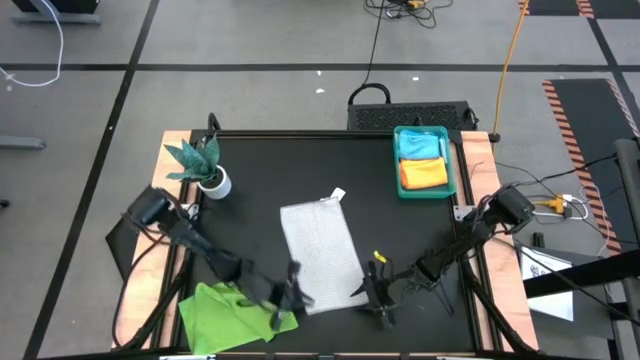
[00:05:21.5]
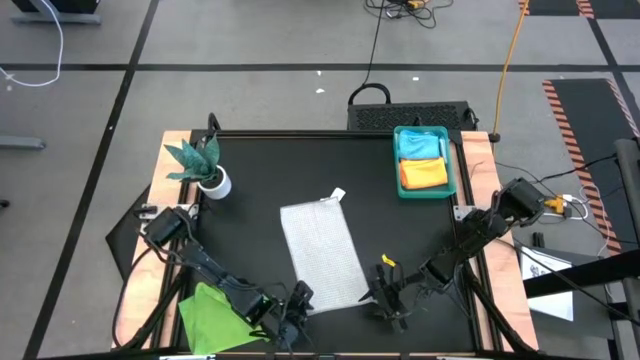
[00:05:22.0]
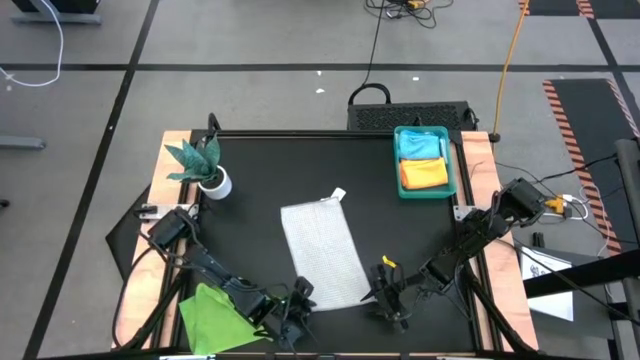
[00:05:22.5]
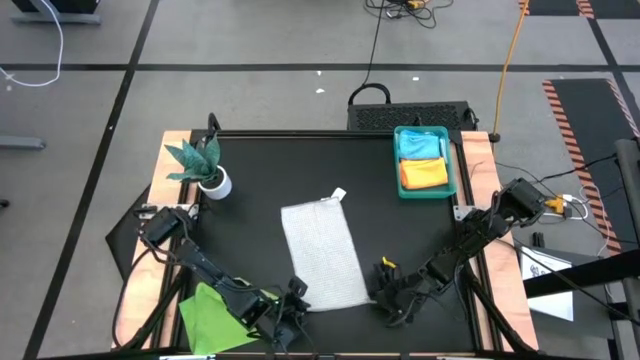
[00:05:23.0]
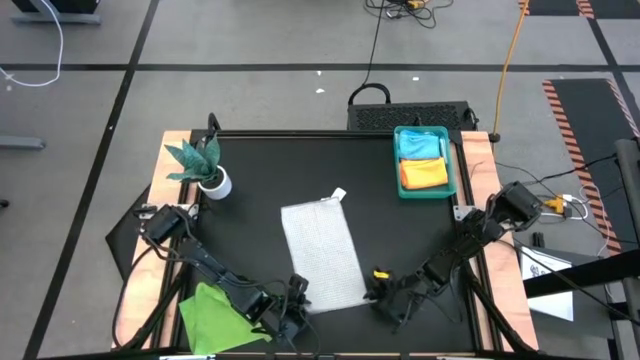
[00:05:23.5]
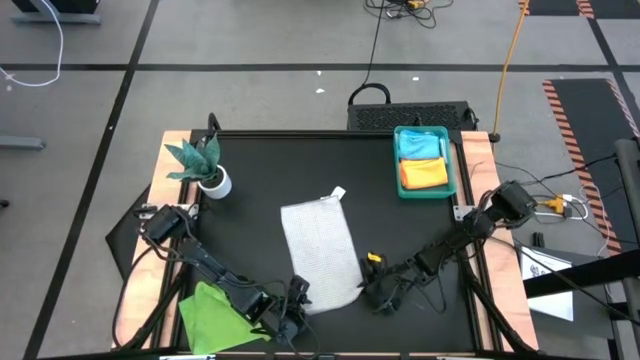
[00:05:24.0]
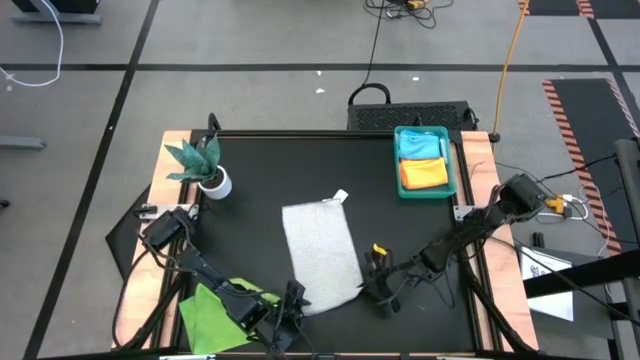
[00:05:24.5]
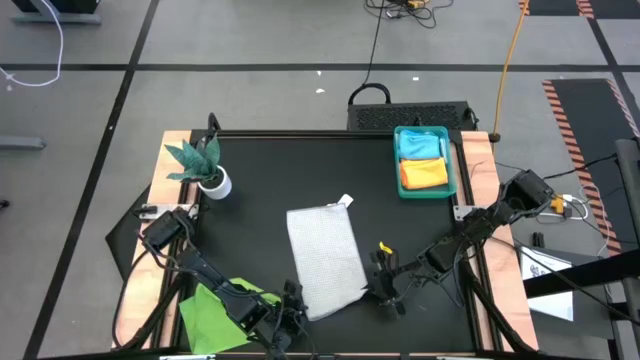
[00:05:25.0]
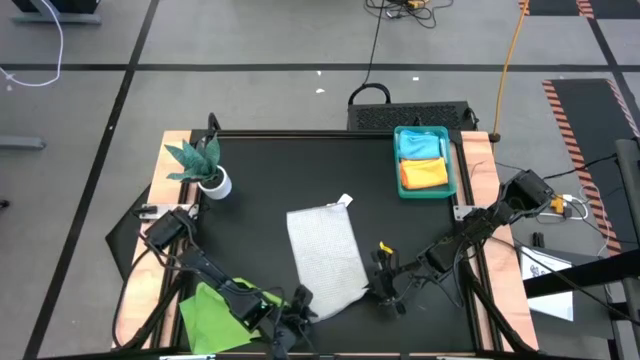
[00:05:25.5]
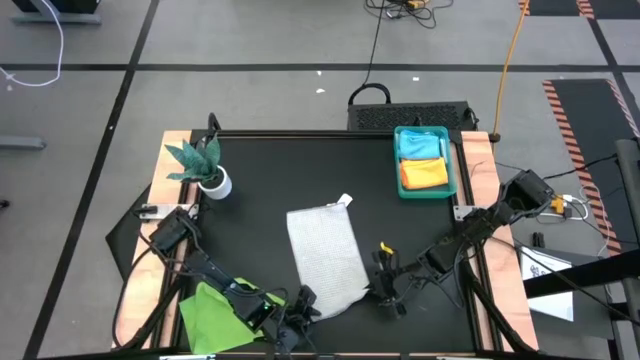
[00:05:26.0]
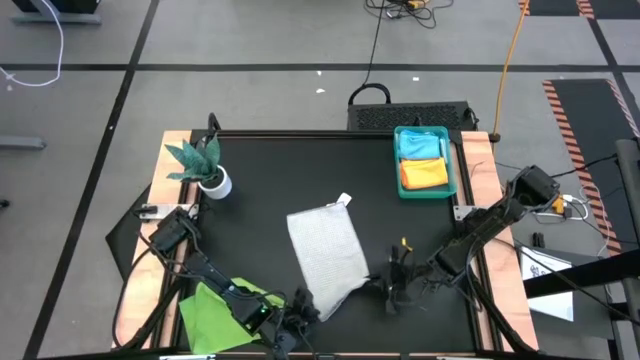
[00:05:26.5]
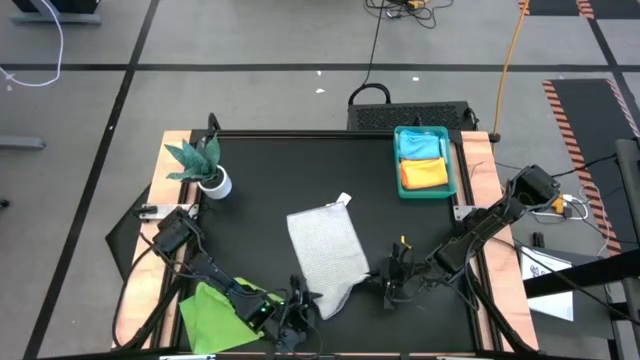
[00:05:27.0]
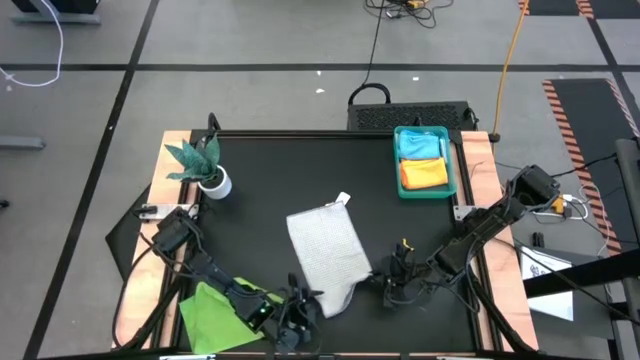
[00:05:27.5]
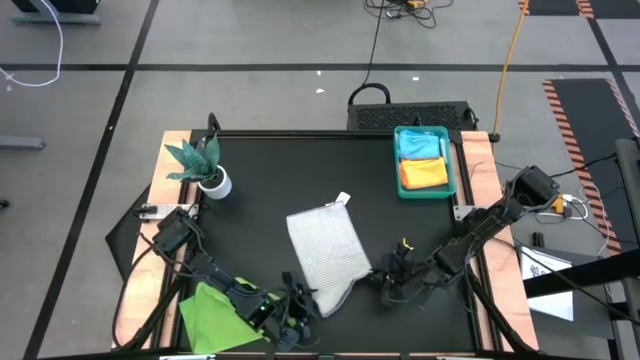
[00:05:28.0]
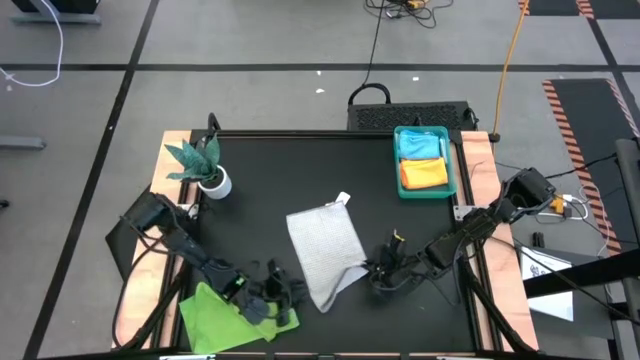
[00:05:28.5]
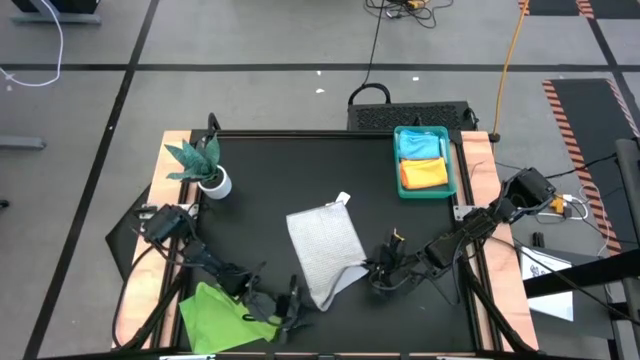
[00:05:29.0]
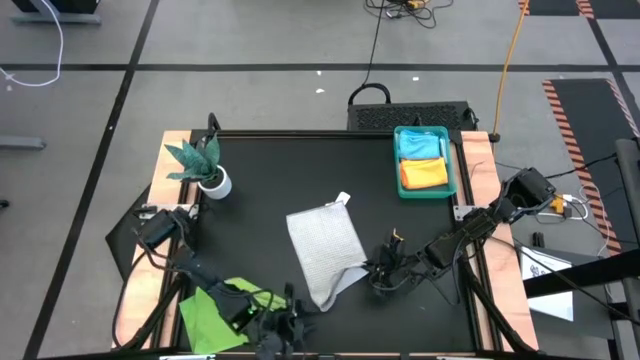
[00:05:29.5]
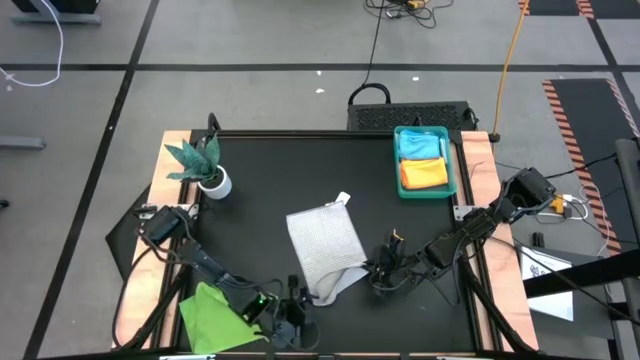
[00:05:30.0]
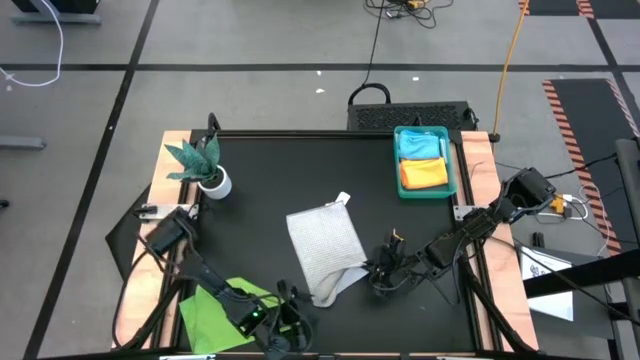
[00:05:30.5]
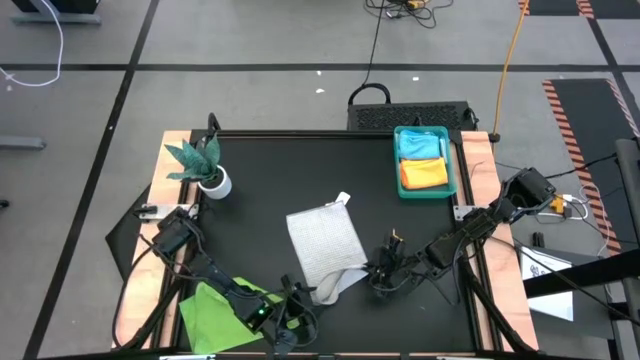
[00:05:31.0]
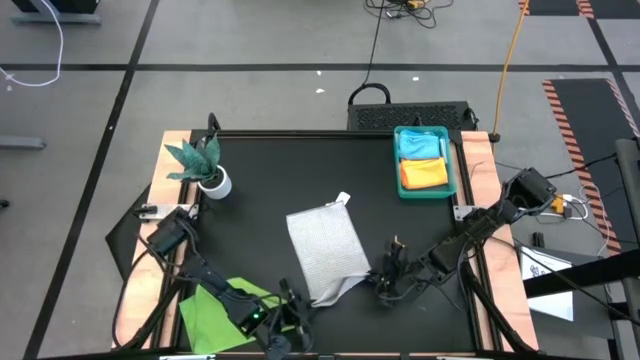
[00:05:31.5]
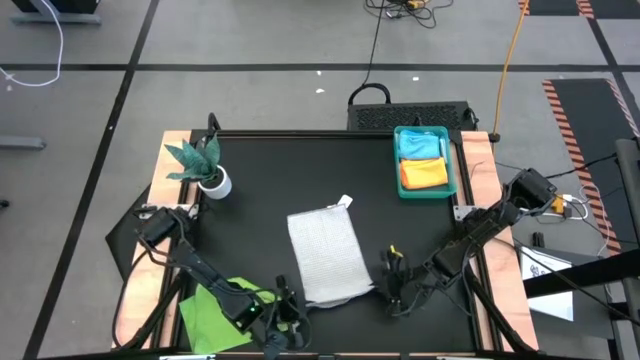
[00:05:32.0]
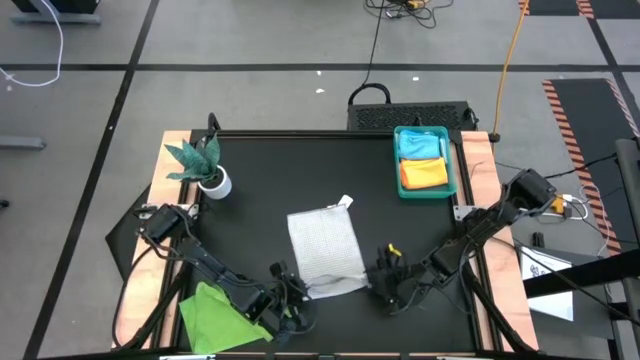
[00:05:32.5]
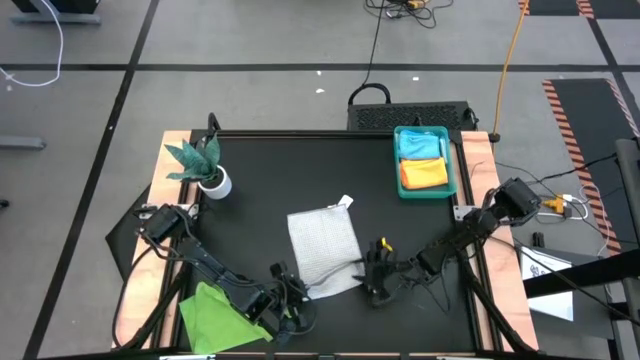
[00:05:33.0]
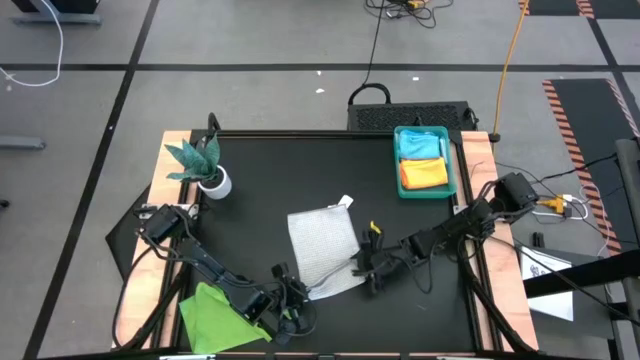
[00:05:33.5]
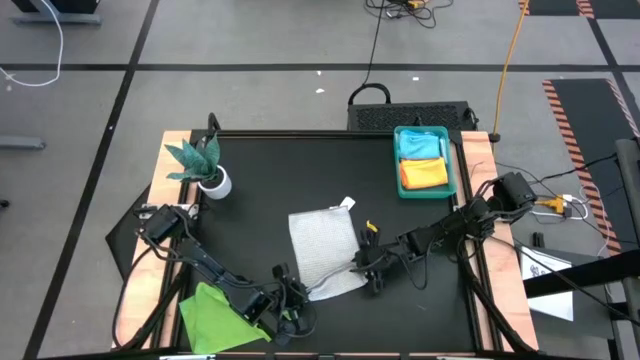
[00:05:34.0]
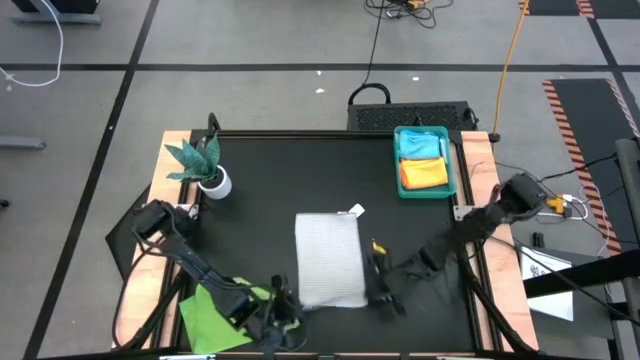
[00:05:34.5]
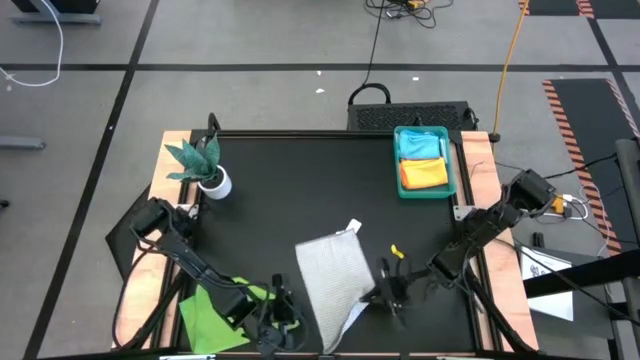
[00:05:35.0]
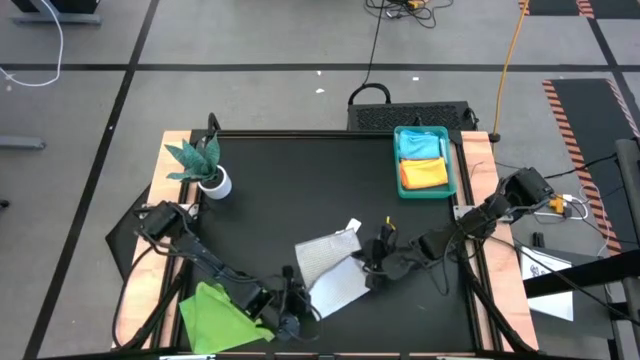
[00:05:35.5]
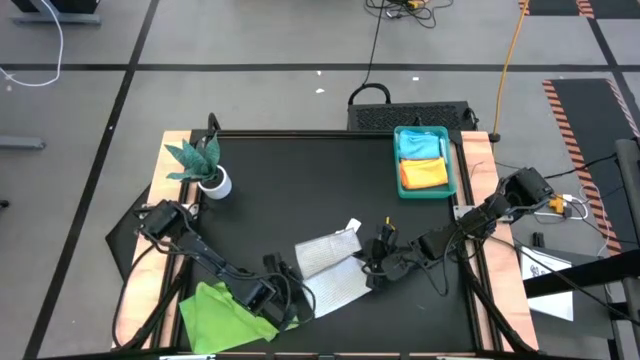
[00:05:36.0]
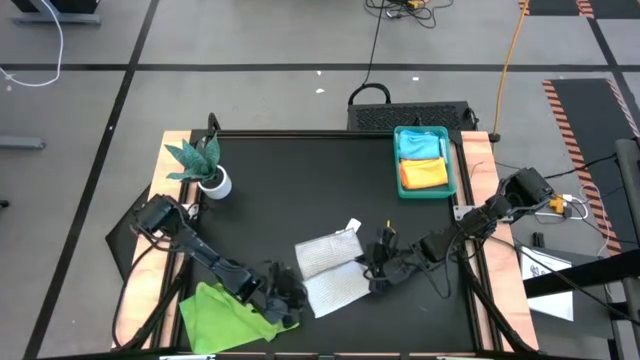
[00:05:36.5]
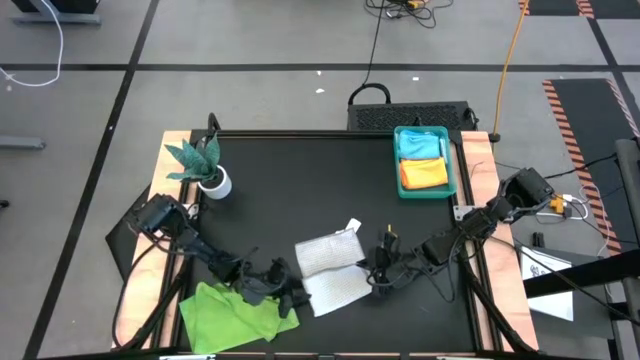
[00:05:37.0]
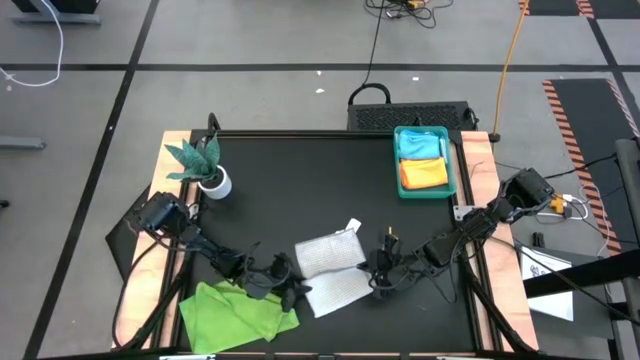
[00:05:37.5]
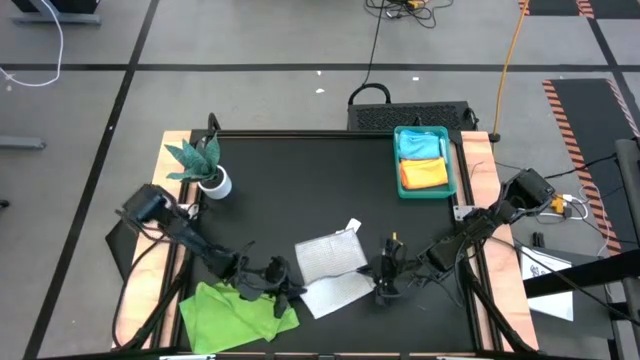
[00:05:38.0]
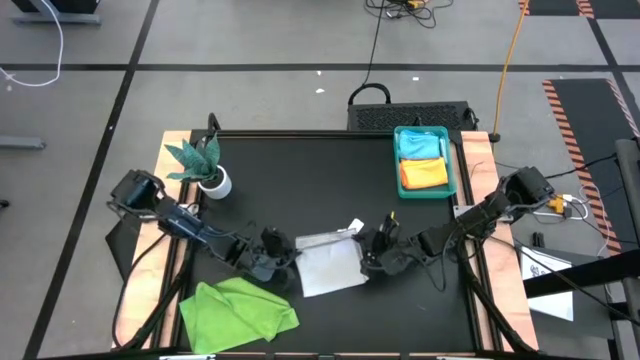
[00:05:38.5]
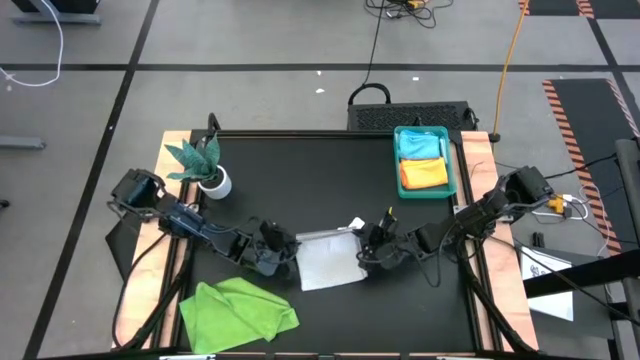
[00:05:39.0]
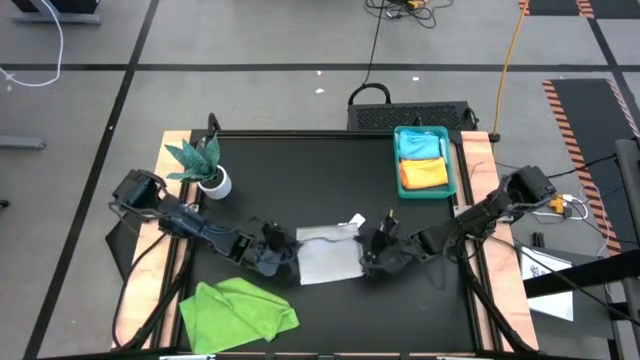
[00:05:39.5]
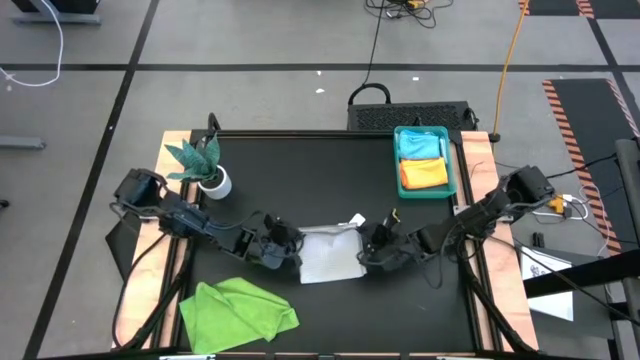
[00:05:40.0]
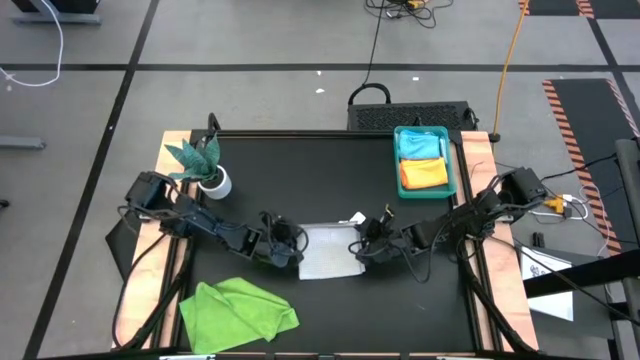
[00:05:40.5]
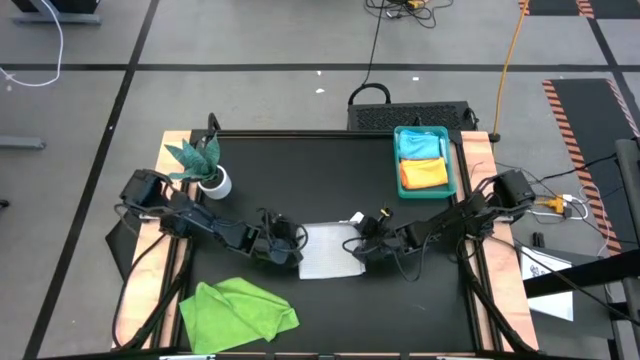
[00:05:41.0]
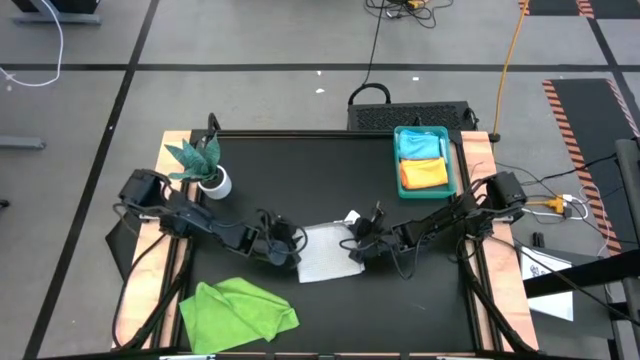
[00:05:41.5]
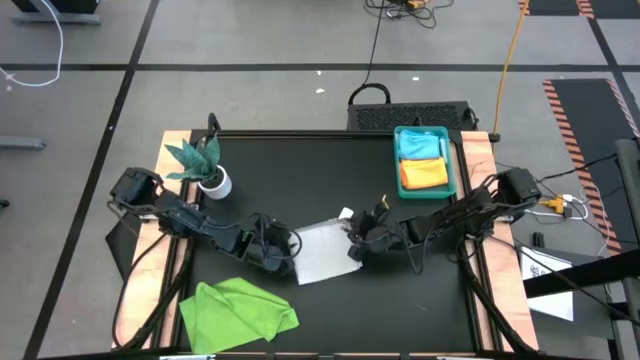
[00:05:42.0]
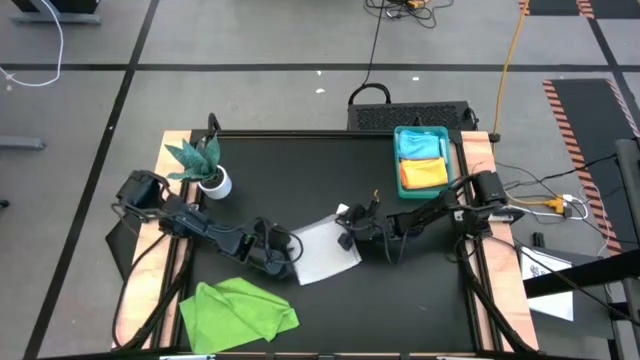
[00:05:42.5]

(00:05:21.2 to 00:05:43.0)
Task: Fold microfiber towels
Fold the white microfiber cloth
